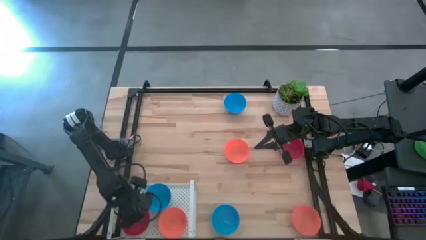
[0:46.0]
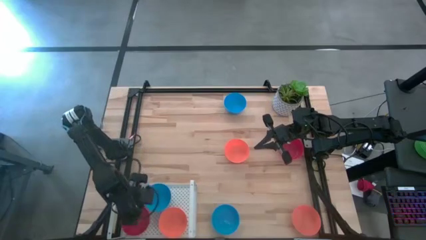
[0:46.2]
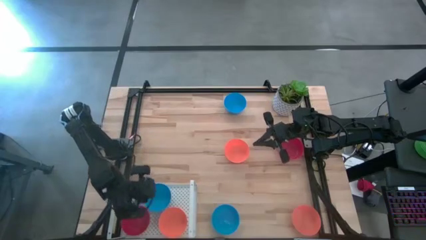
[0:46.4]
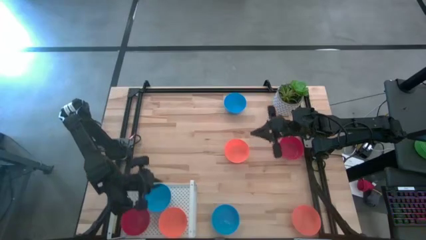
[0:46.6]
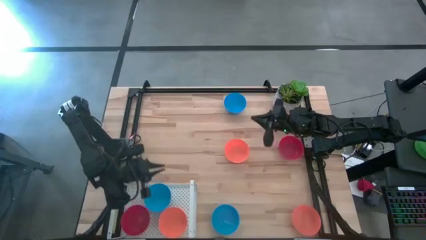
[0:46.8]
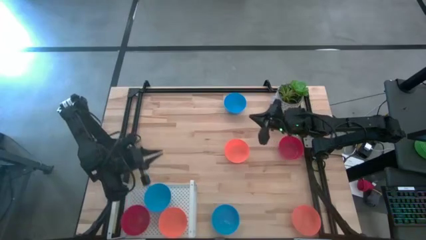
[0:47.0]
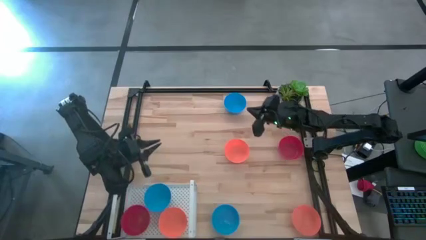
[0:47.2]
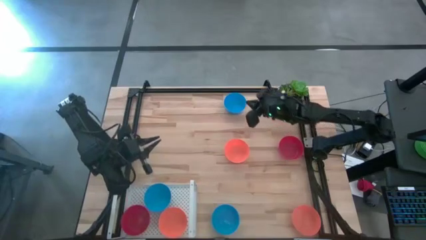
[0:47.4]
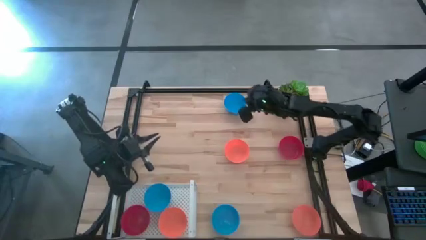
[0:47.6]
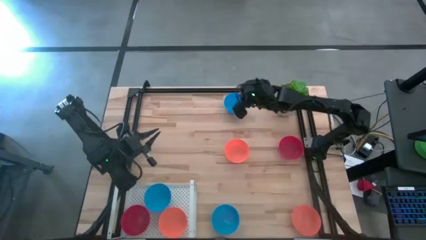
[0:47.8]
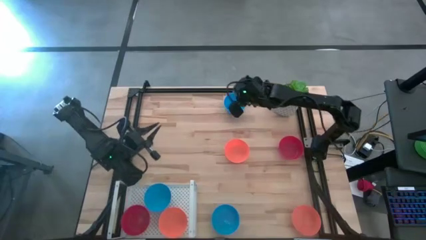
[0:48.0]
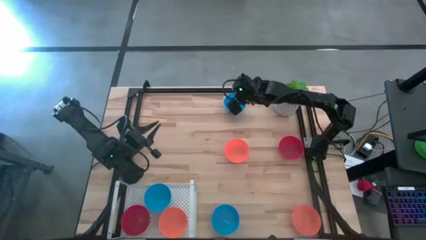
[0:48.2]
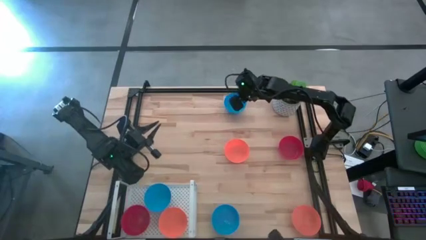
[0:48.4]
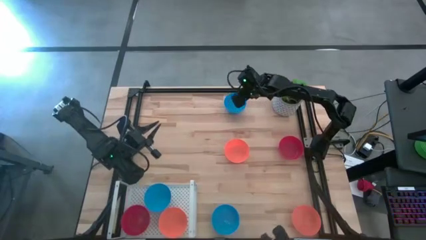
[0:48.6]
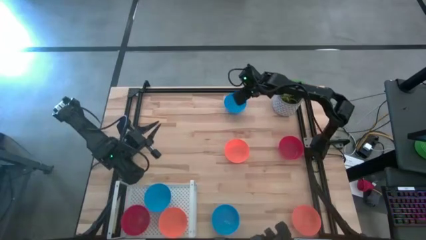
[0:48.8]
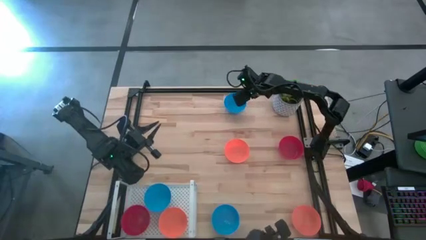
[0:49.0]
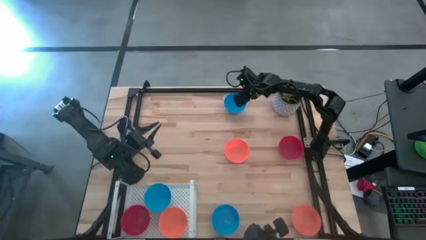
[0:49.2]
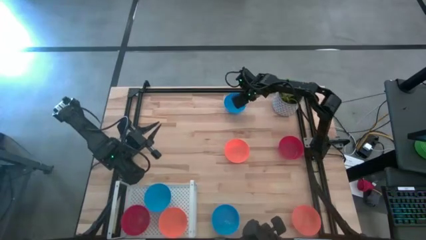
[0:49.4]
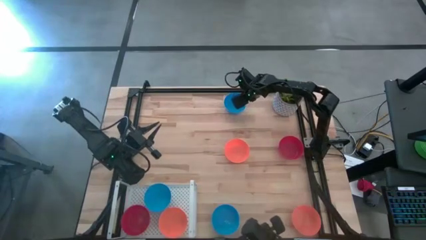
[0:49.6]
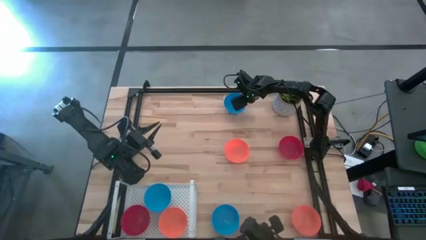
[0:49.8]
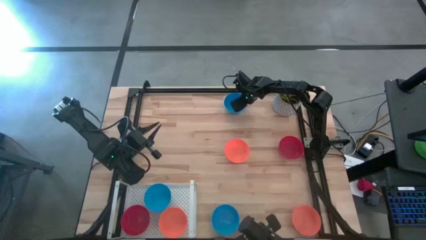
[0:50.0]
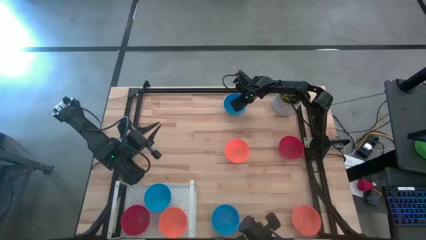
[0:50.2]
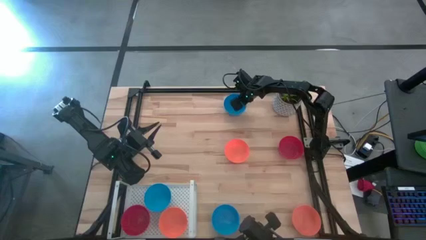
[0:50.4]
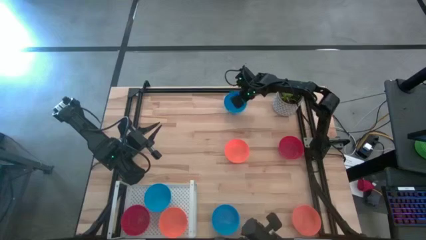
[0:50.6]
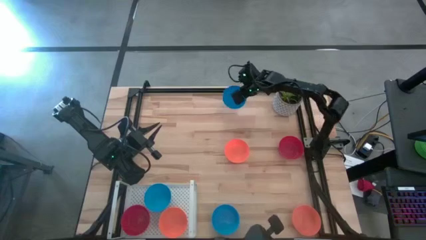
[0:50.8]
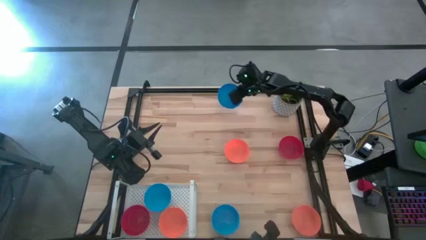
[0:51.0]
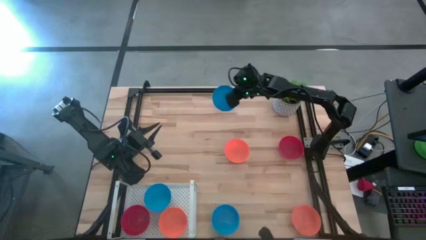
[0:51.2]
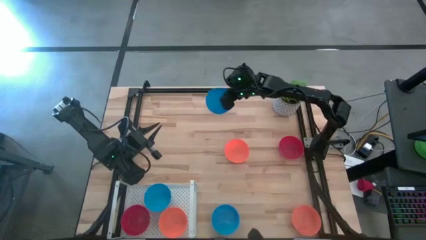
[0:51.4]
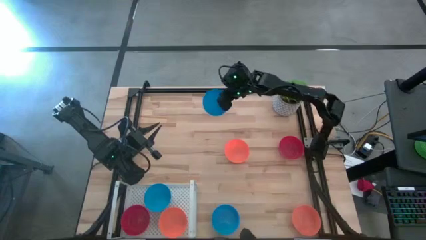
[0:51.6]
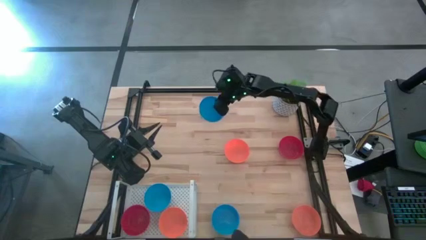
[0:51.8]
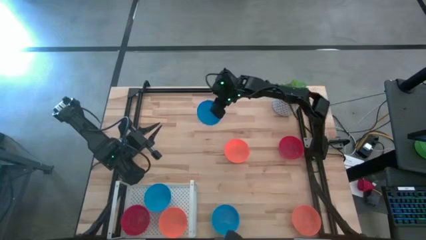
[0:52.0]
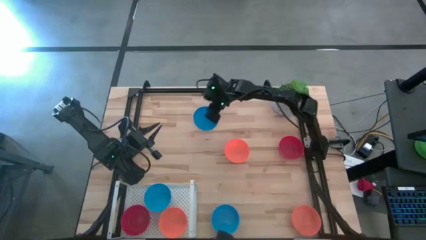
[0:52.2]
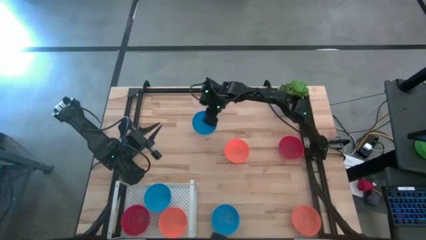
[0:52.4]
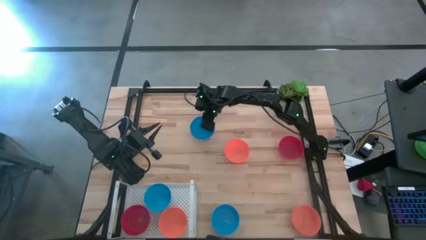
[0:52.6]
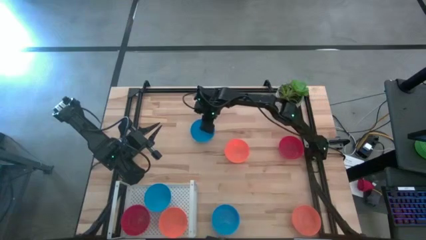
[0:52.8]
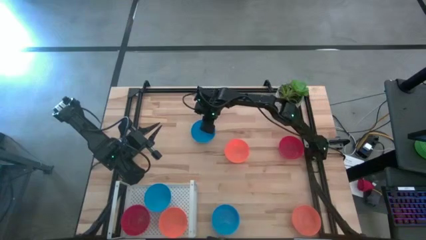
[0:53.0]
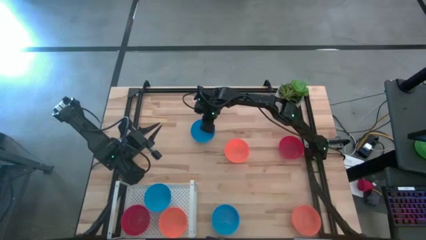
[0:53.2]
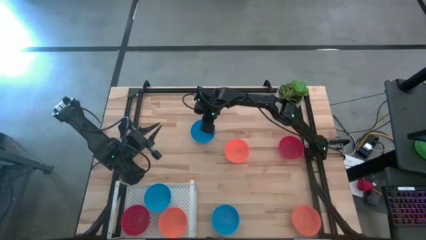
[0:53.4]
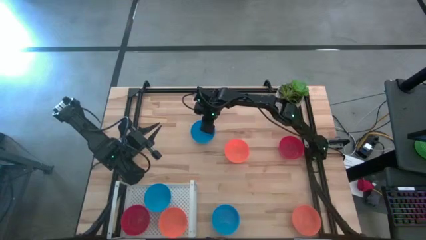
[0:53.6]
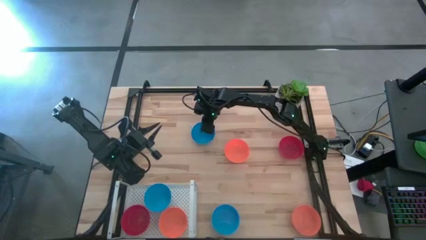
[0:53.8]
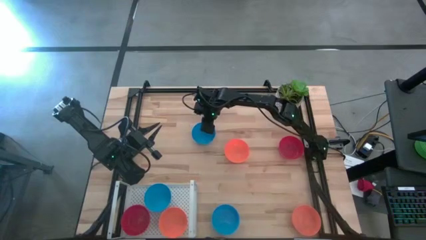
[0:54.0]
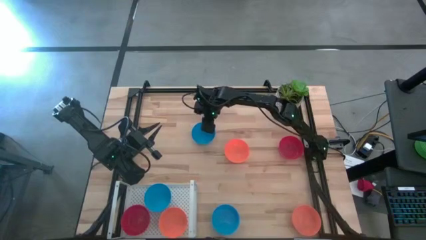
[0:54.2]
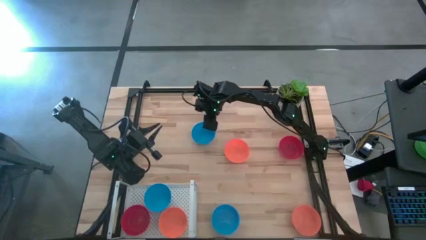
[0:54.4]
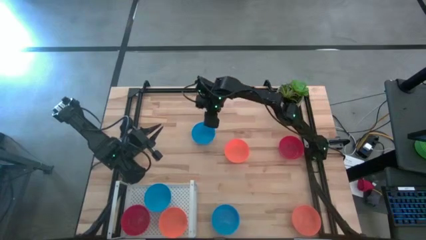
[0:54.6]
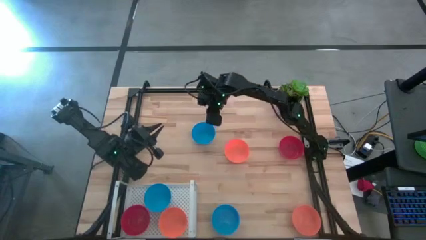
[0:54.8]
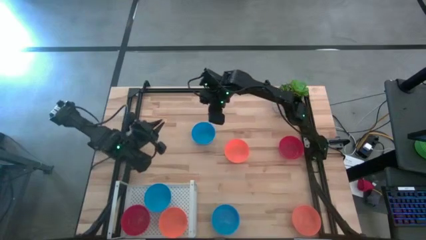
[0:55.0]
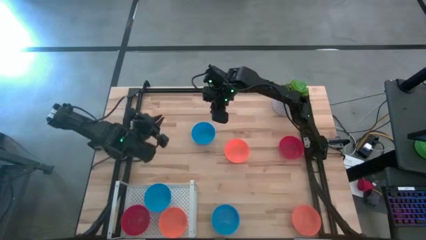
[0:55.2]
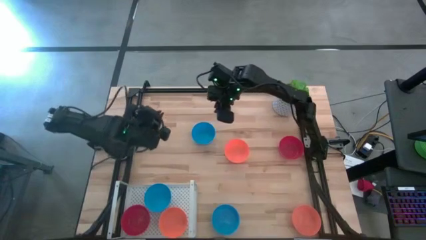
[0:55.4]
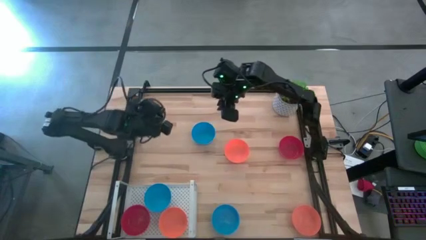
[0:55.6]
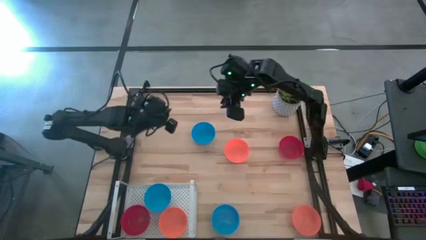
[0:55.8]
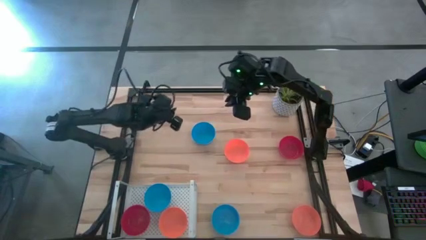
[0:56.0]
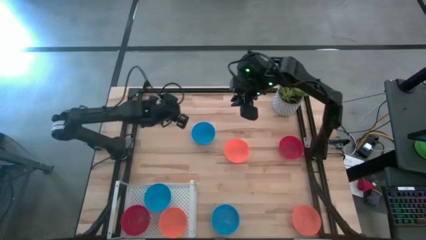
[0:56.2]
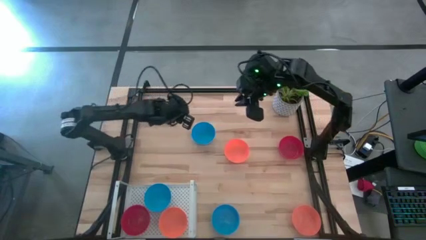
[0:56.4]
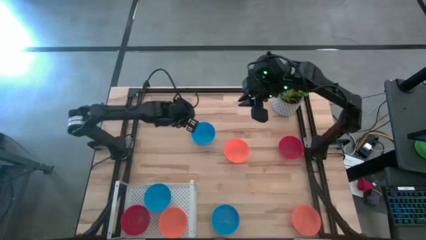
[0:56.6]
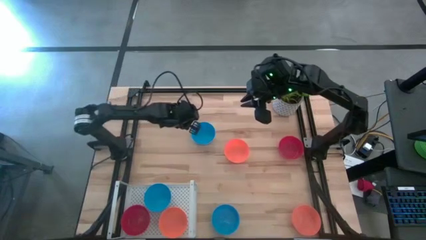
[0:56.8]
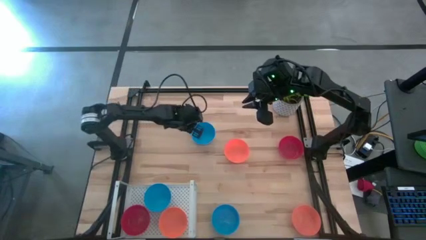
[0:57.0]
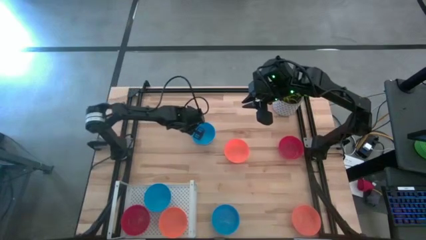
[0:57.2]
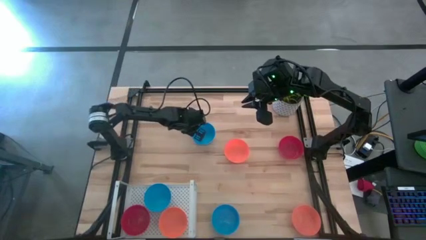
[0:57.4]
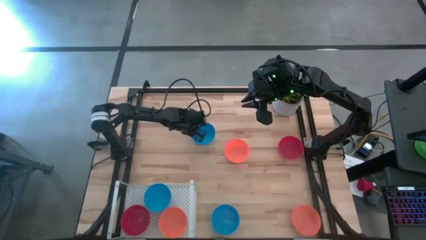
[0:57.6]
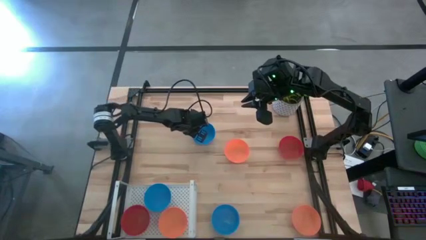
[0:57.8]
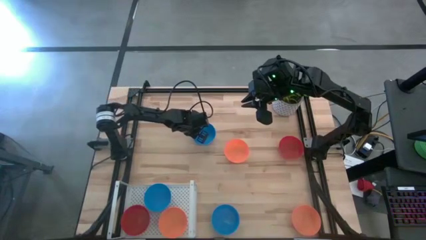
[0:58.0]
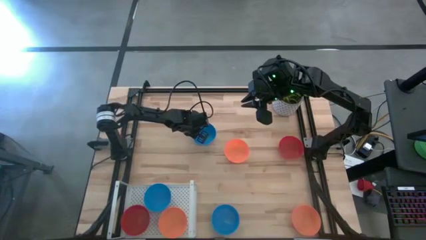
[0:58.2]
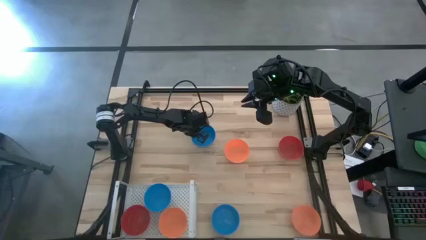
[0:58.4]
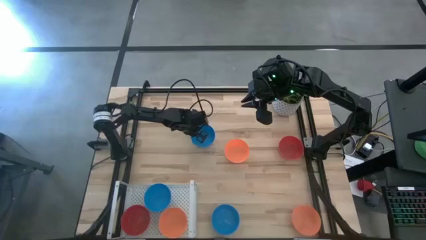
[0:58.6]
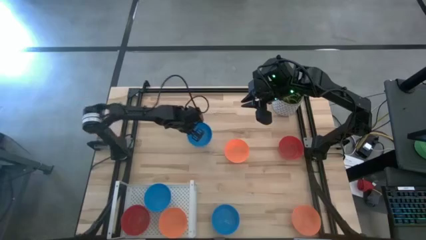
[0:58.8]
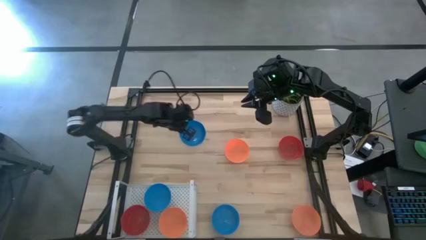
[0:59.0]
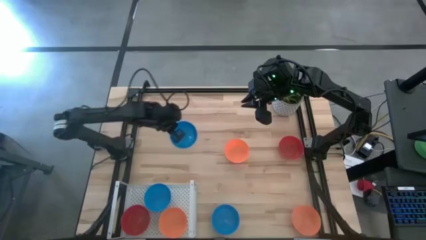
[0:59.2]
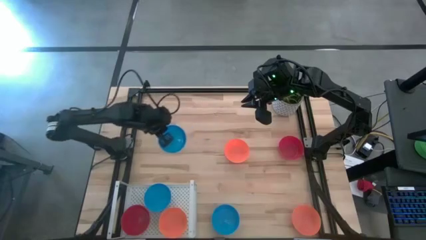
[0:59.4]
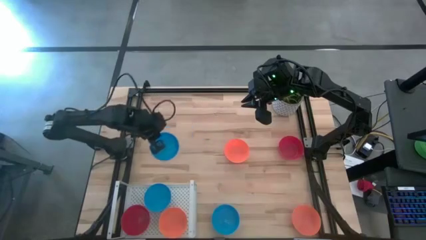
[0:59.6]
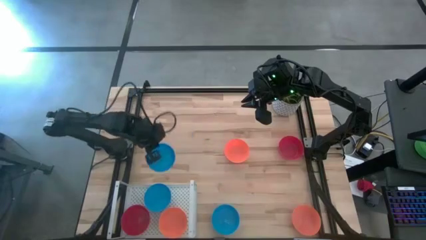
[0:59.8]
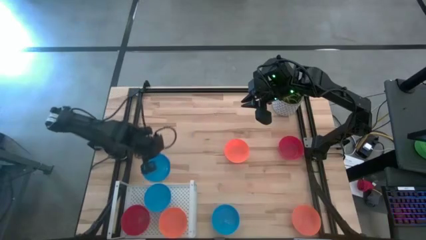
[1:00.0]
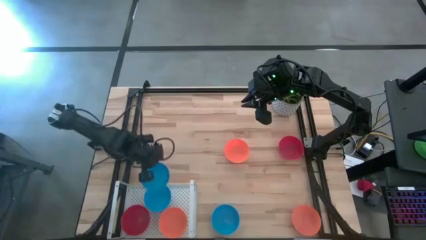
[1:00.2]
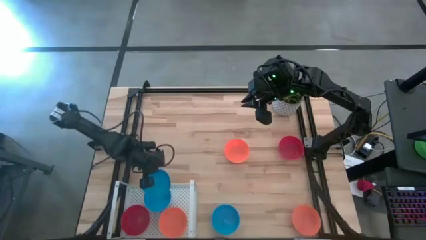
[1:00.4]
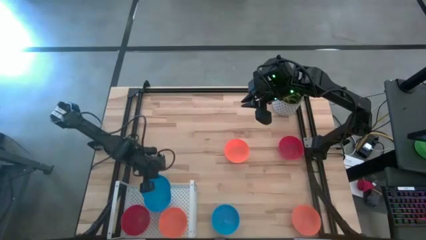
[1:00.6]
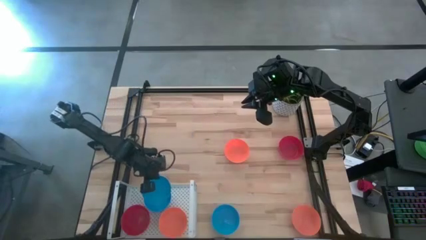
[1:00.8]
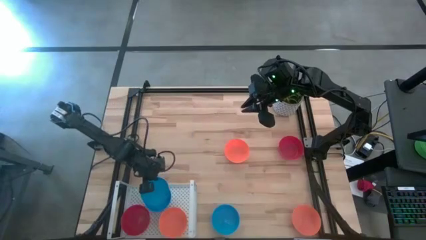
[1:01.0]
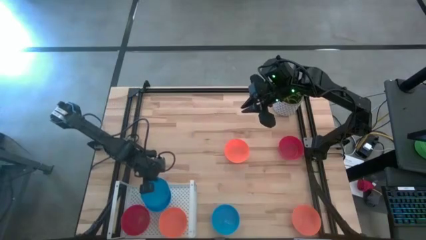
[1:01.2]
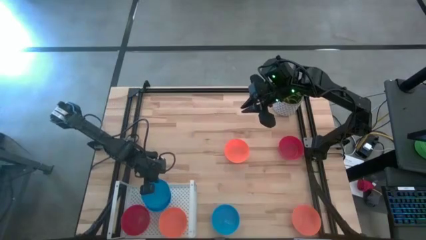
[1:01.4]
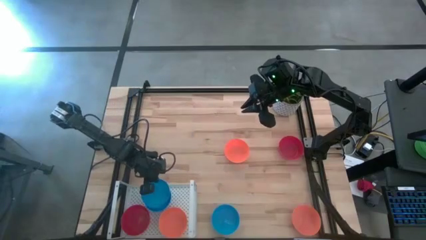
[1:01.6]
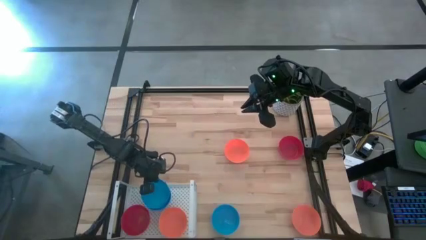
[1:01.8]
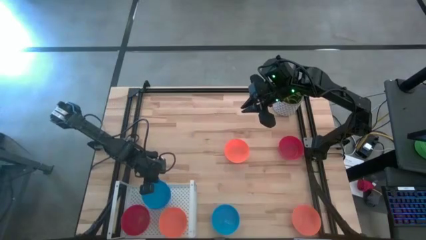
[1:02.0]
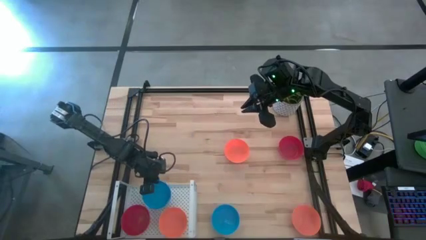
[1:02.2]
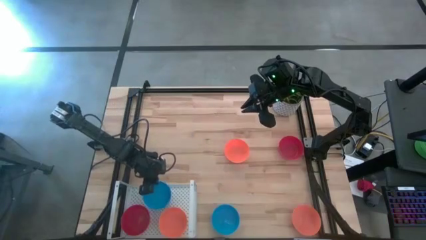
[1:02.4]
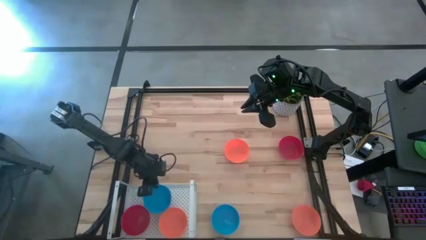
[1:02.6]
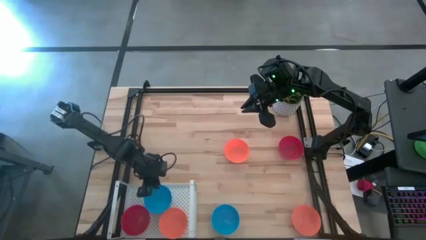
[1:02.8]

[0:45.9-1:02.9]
Task: Pick & Place Mini bowls
Stack the top blue bowl on top of the blue bowl on the shelf
